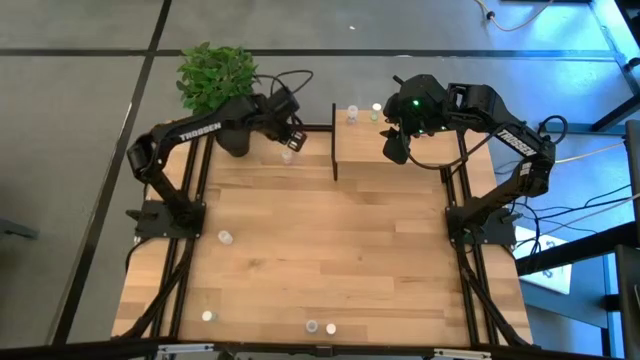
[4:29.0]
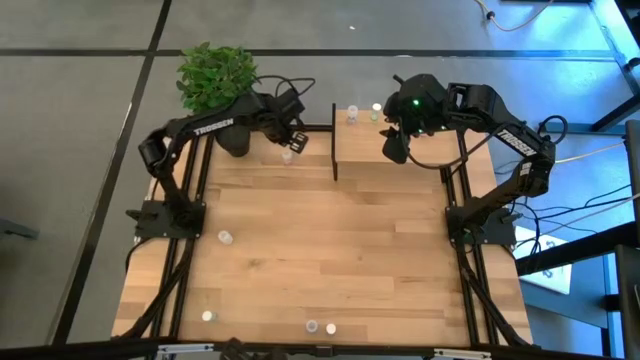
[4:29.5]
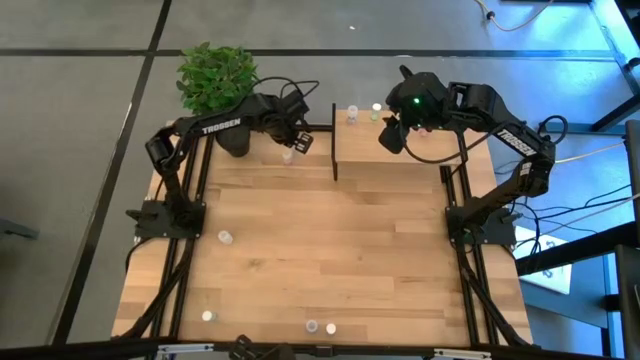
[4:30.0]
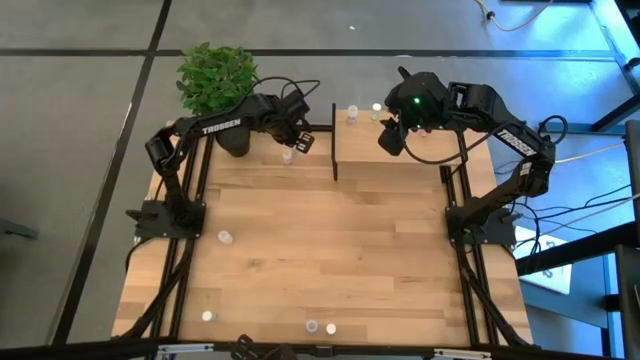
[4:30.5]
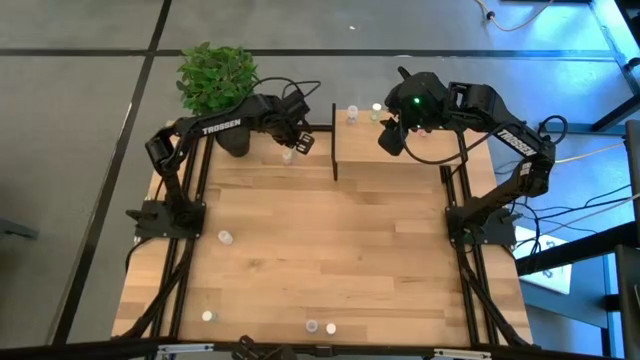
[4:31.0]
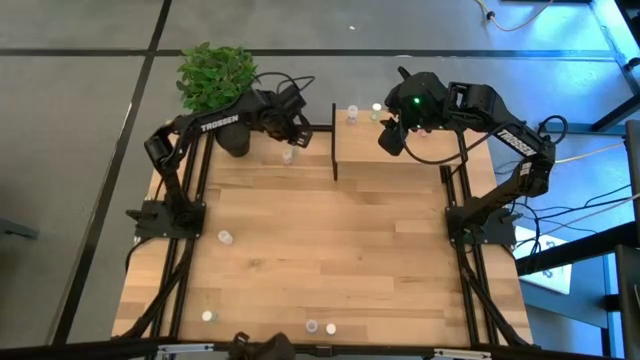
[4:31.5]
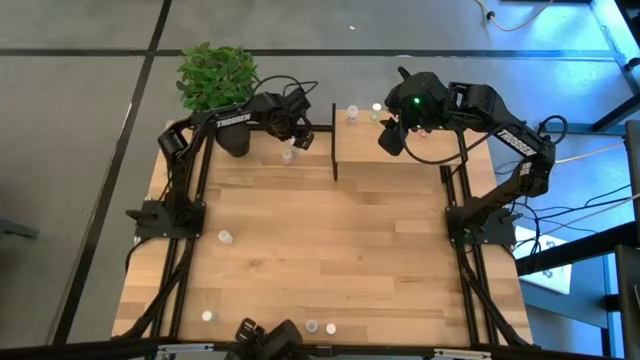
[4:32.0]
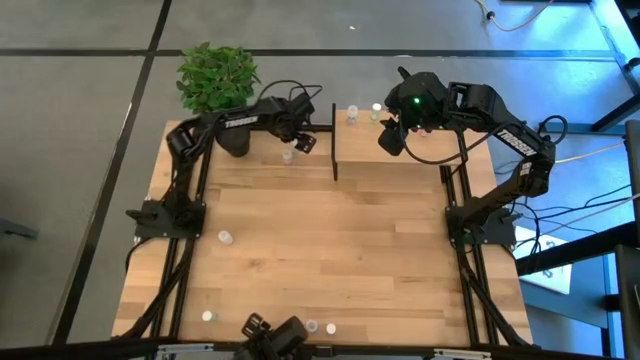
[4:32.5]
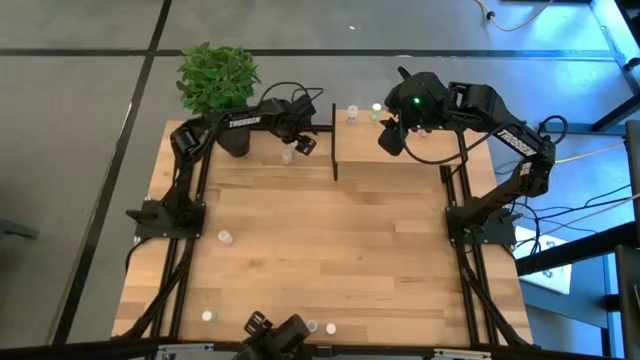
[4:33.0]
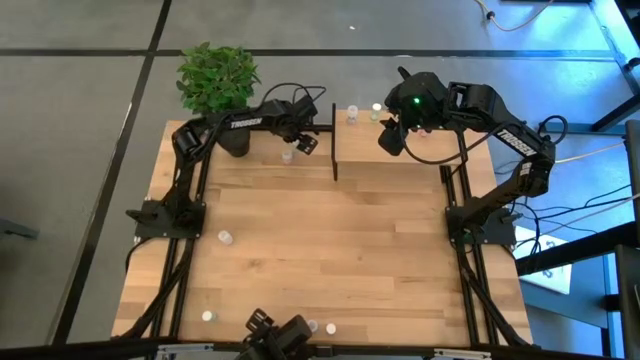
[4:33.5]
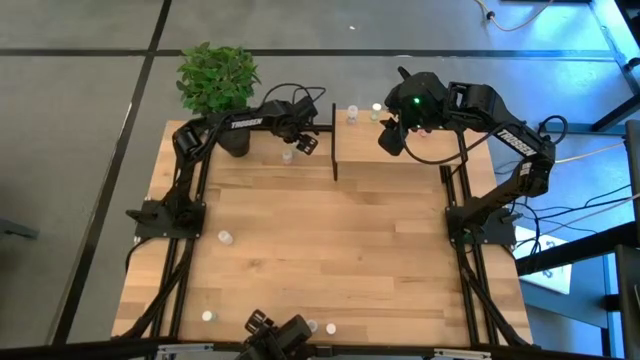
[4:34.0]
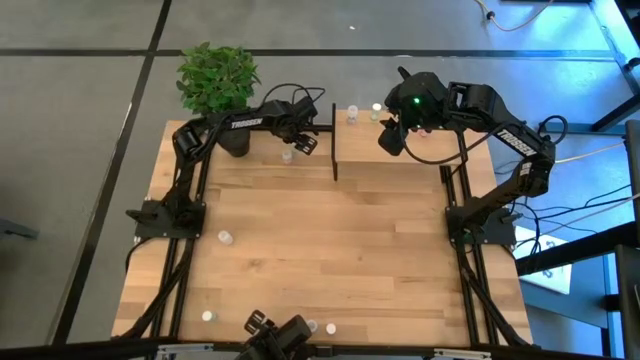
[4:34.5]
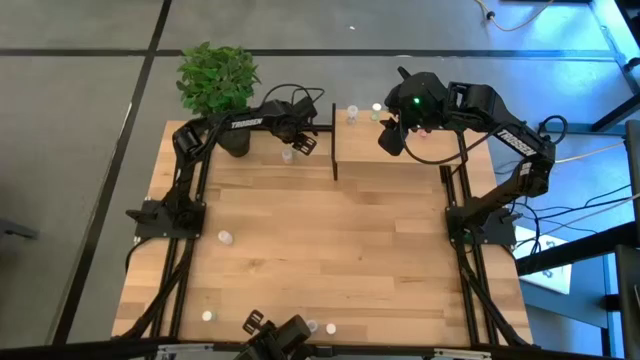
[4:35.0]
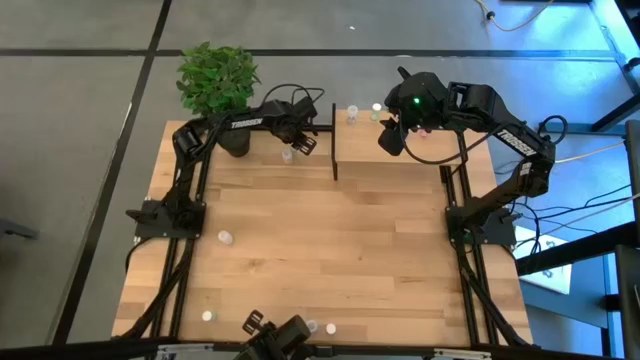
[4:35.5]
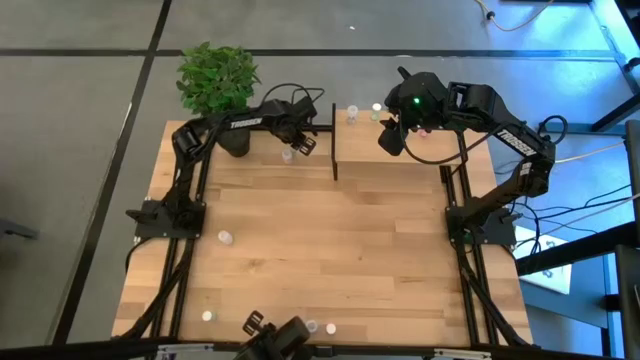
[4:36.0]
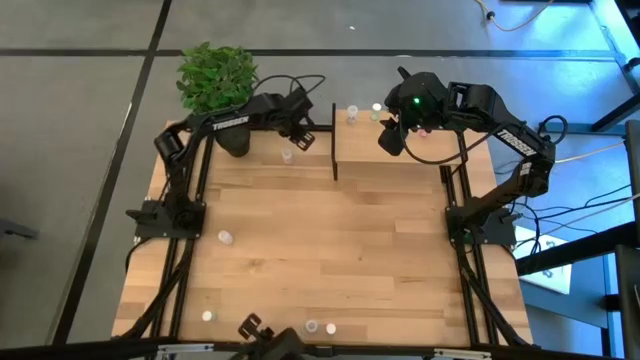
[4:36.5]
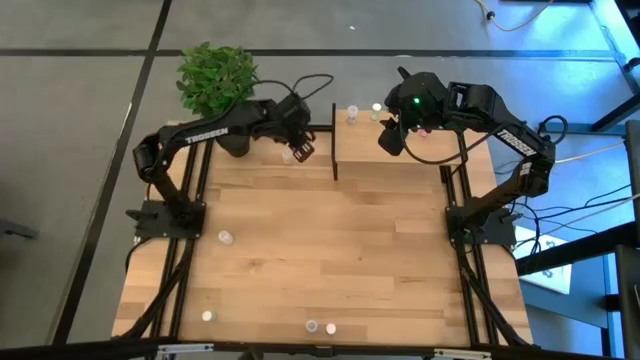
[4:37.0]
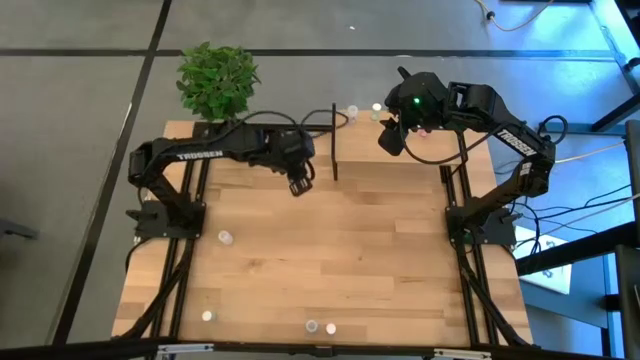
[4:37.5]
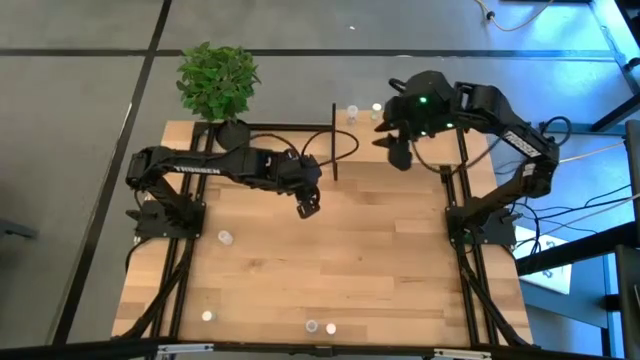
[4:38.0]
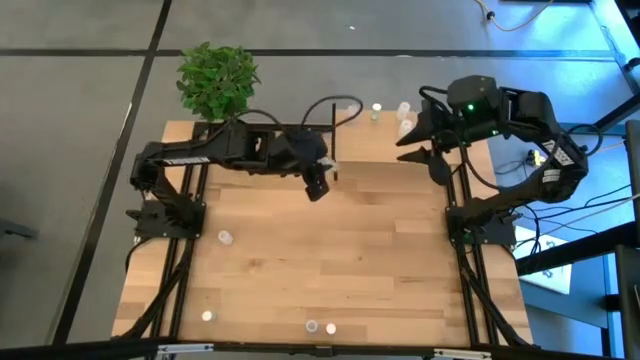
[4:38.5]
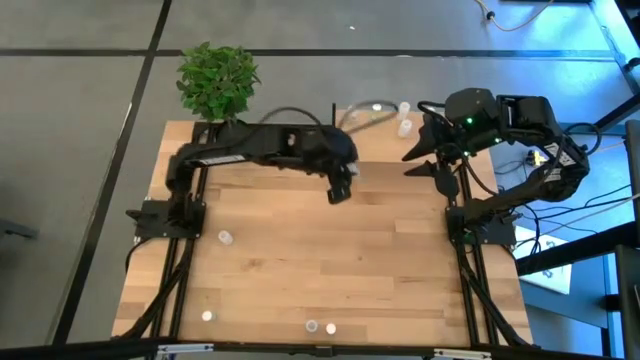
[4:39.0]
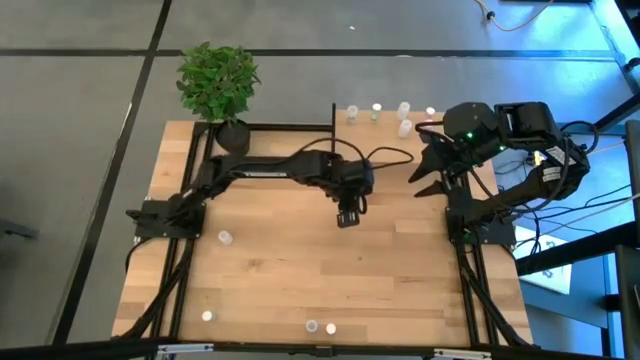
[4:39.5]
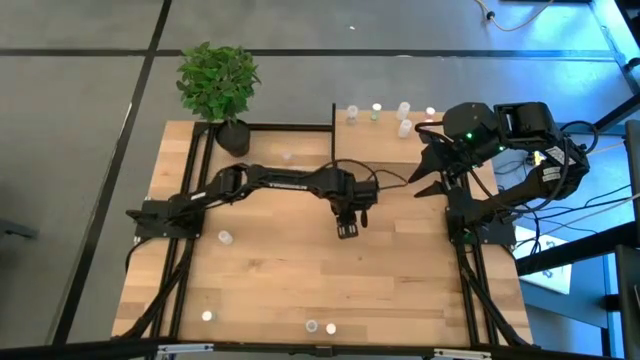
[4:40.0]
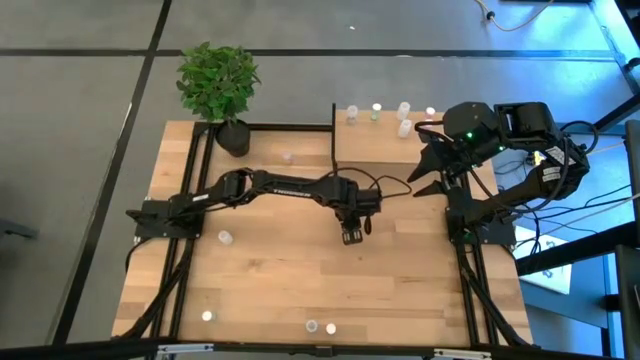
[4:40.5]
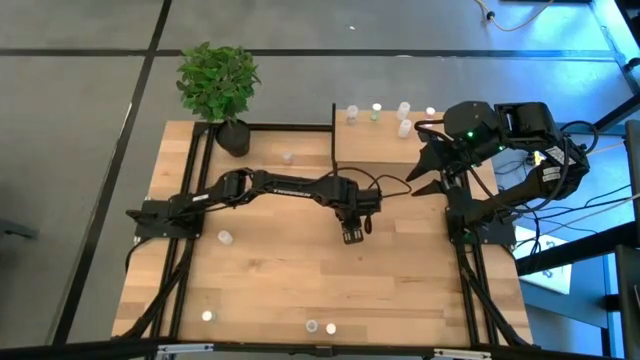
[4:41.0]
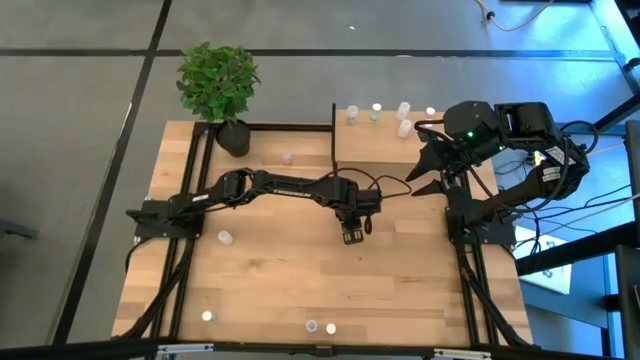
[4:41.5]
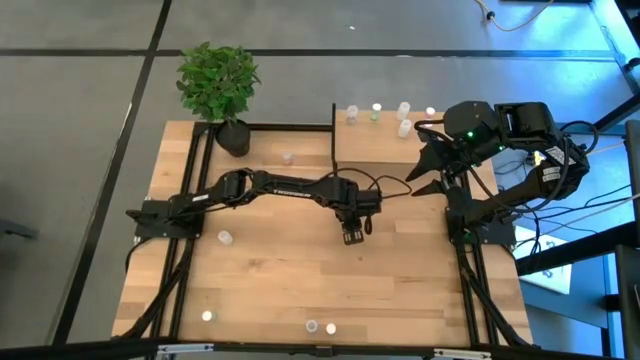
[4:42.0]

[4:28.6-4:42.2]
Task: Pick and place medicine bottles onto shelf by color
Put the top green pill bottle aligned with the other green pill bottle on the shelf
